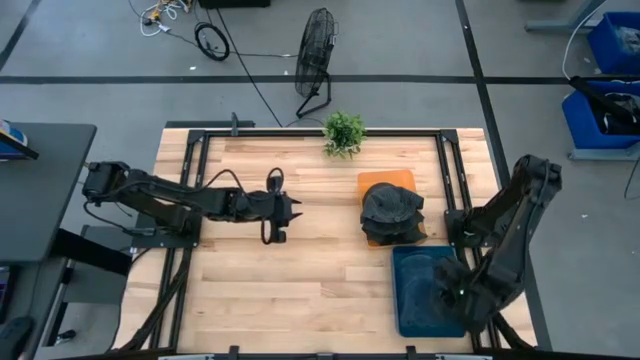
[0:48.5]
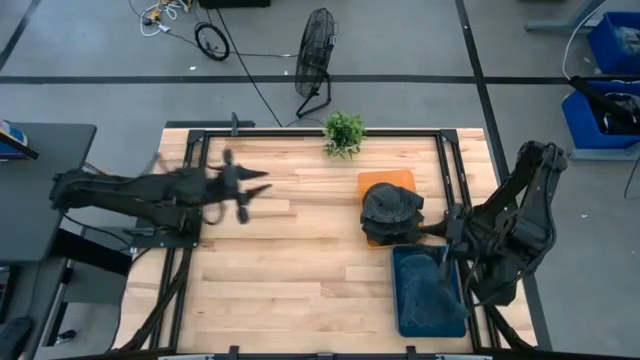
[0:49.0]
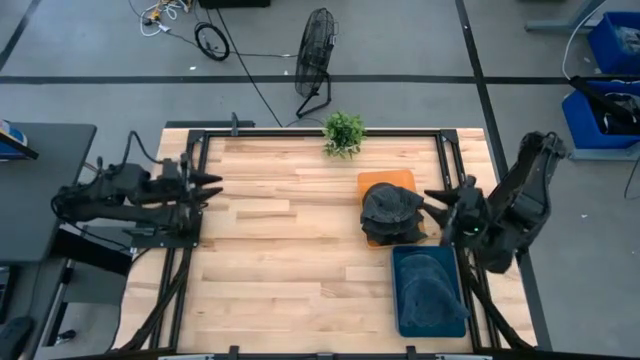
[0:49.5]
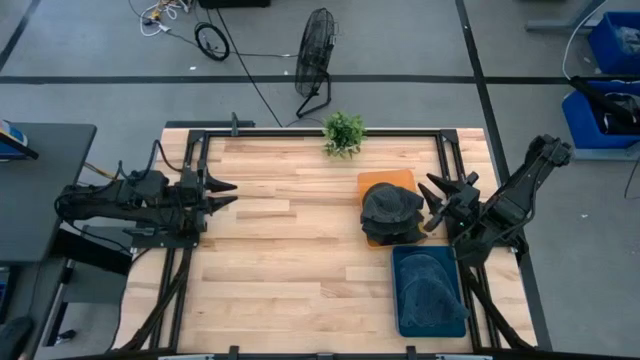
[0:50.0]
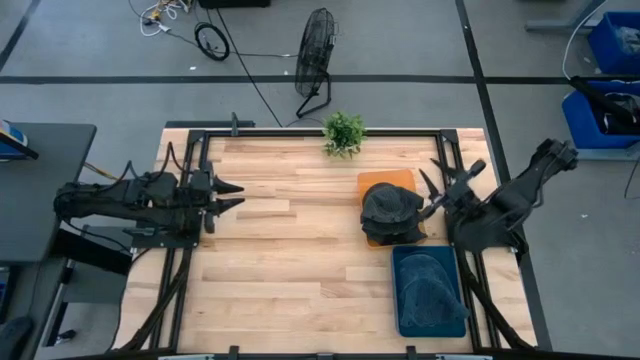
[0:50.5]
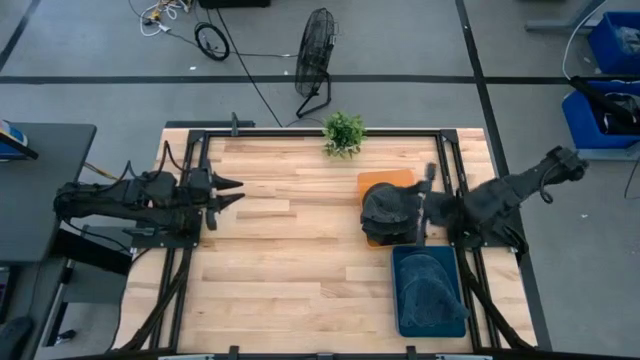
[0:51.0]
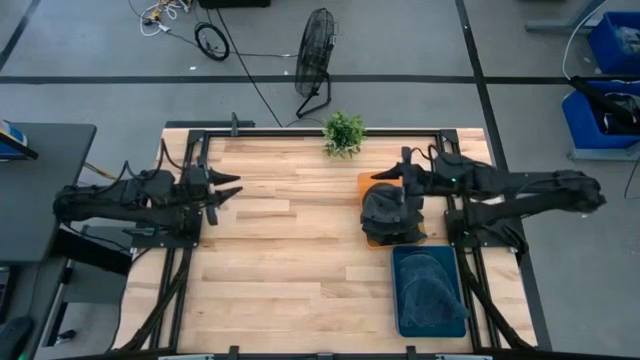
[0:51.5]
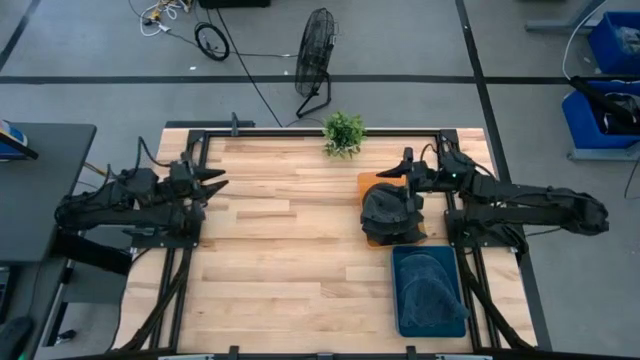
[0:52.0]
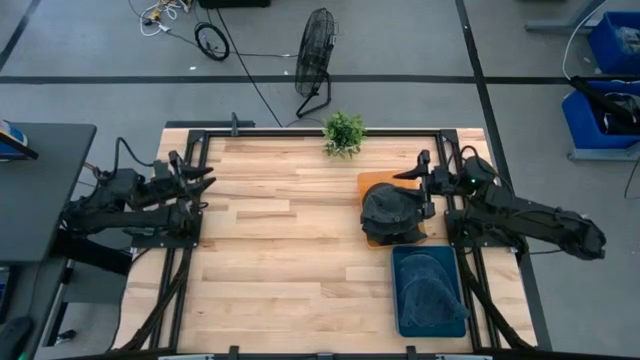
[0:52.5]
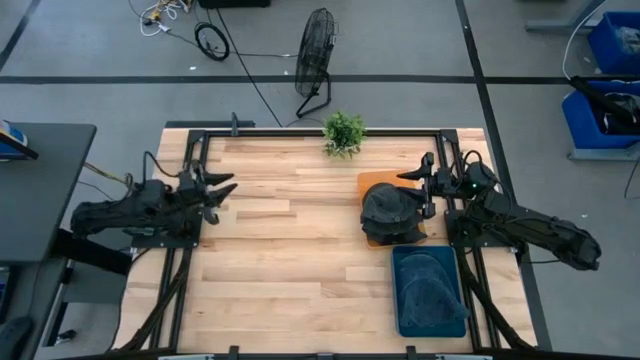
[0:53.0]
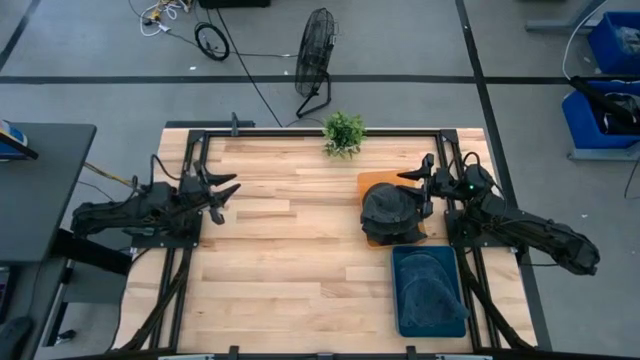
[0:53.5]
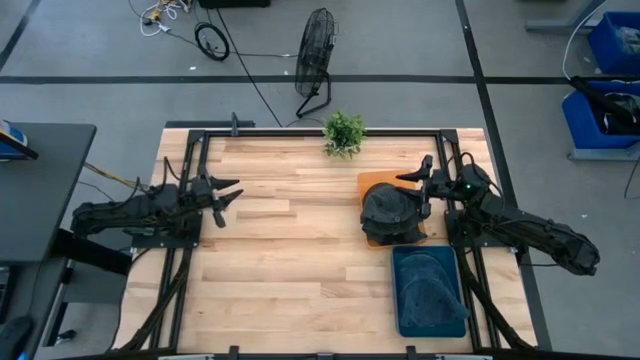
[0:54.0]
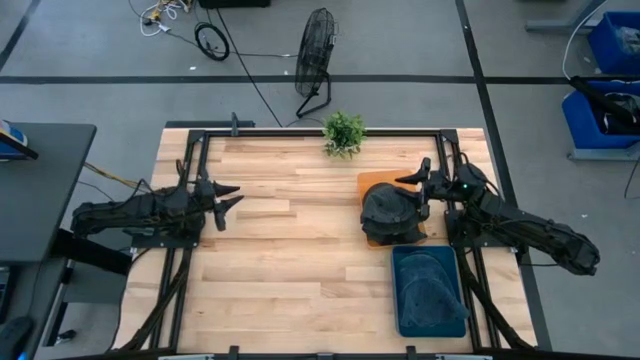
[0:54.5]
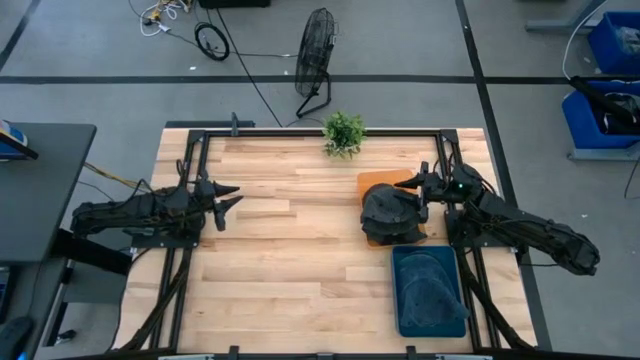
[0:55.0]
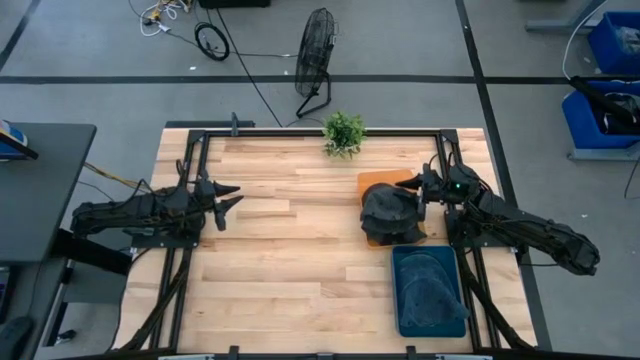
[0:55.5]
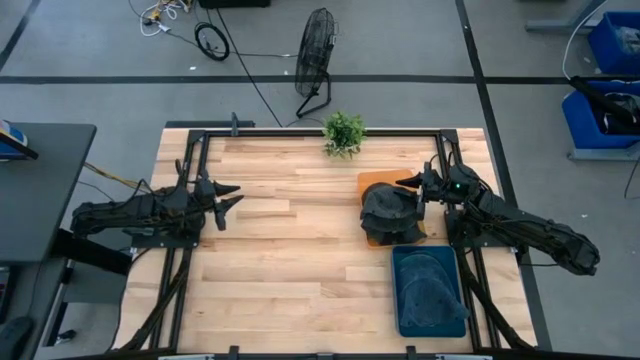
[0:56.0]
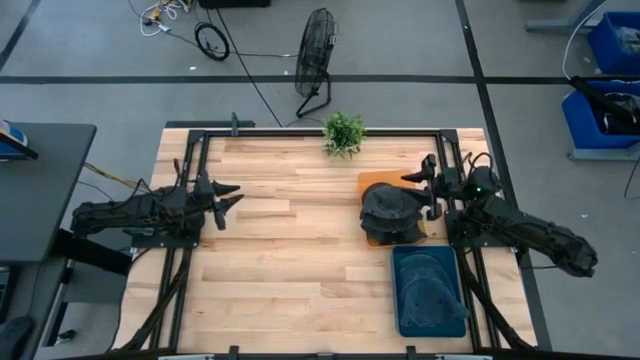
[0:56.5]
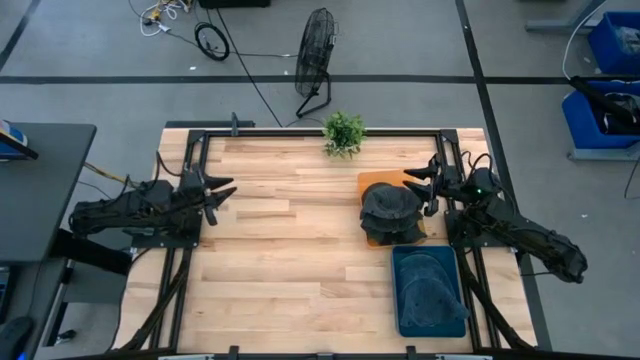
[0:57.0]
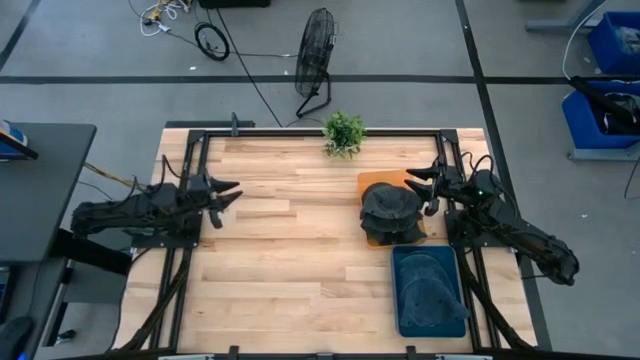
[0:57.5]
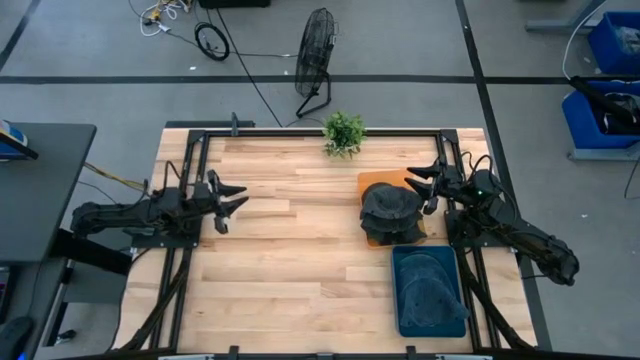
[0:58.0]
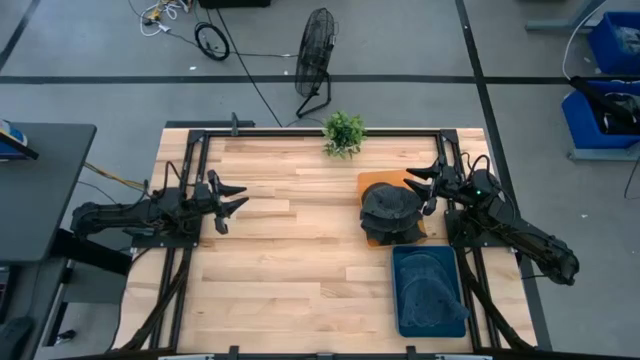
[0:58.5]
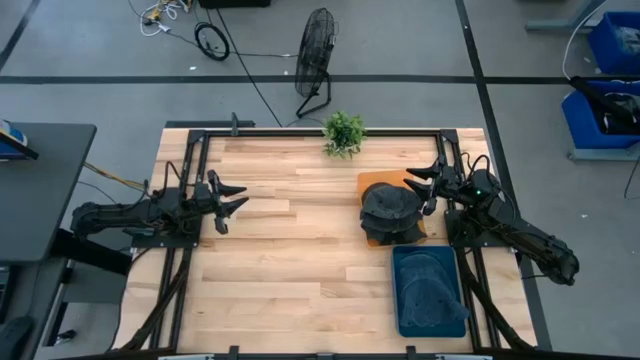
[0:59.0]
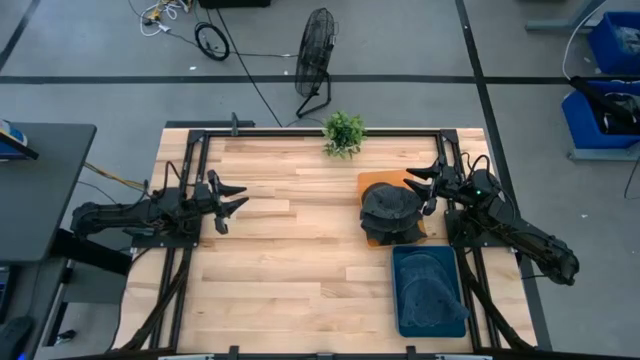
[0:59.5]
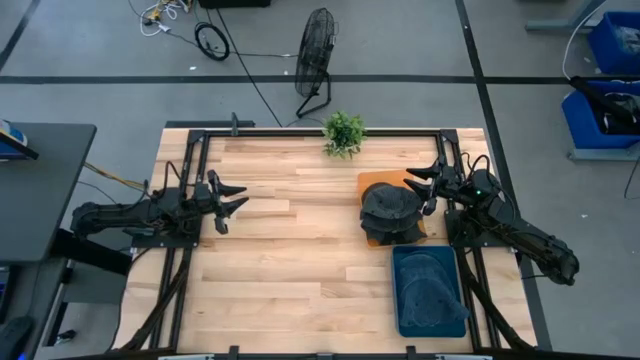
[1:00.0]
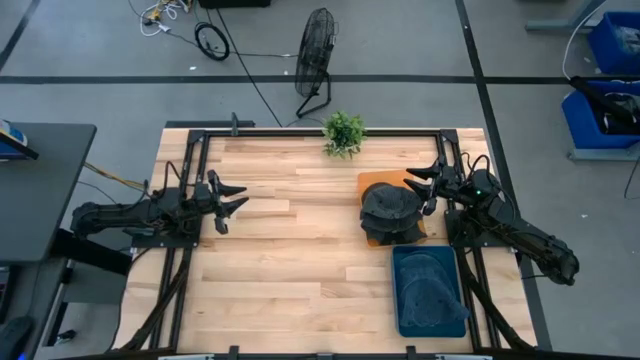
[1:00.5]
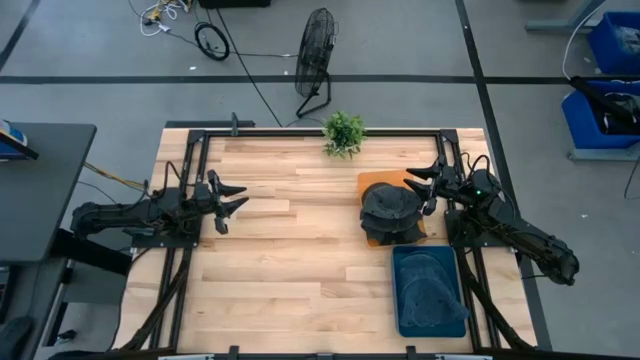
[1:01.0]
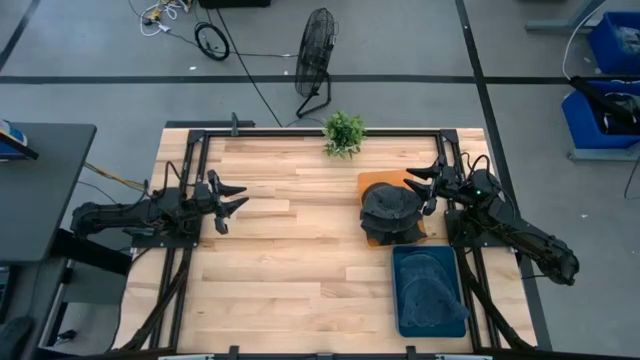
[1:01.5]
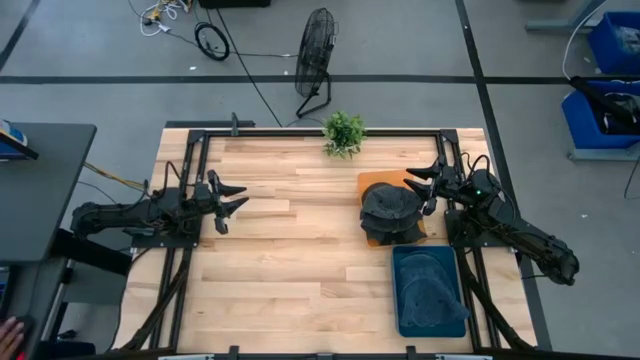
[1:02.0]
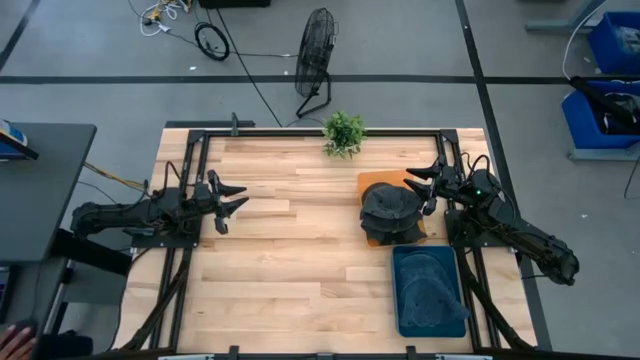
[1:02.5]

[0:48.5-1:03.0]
Task: Pick & Place hat
Return to Home Position

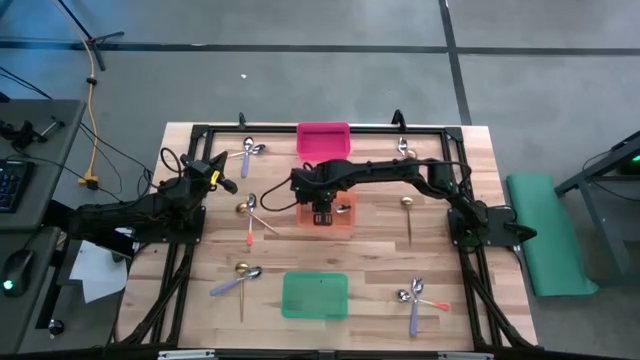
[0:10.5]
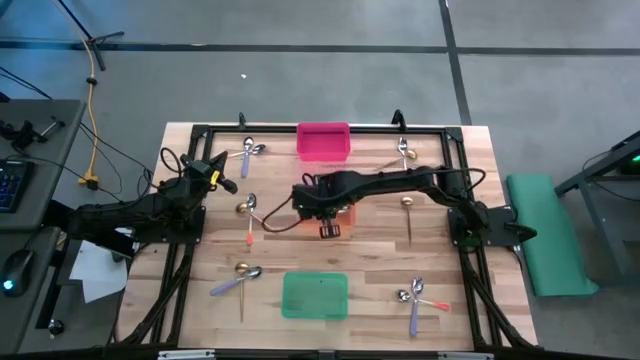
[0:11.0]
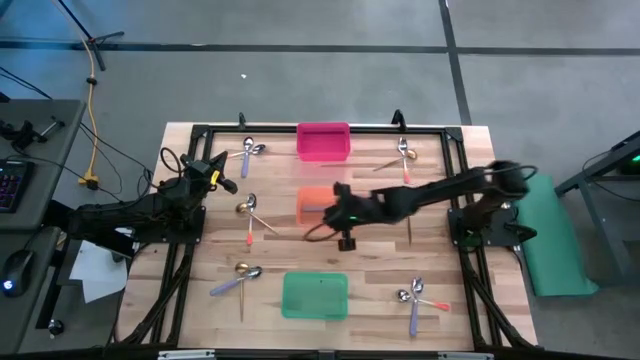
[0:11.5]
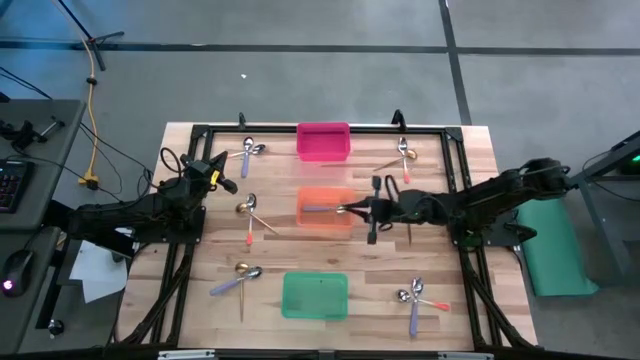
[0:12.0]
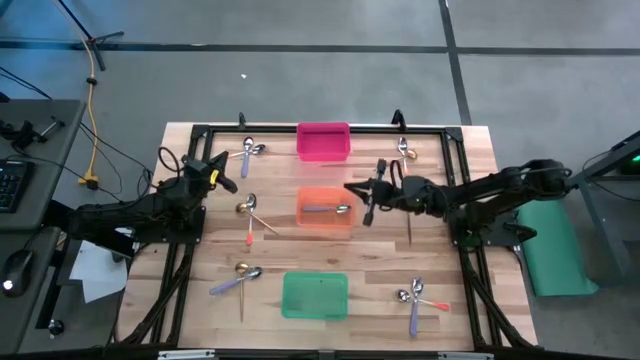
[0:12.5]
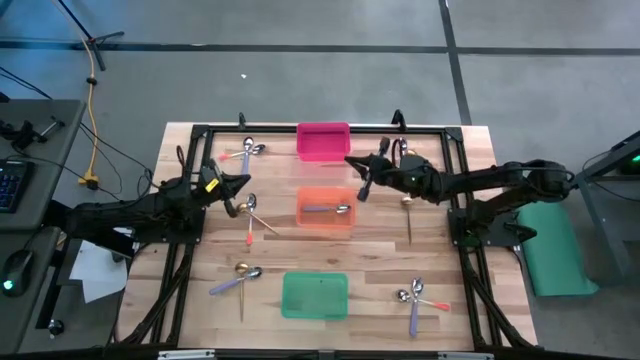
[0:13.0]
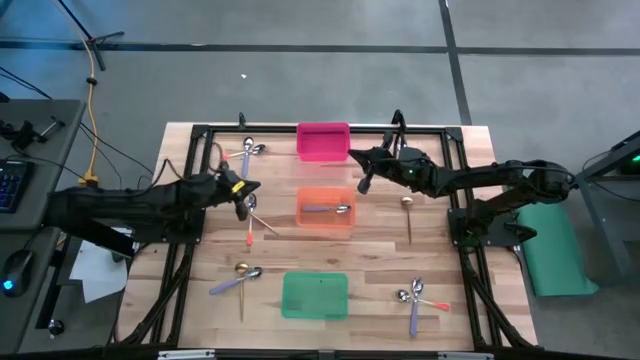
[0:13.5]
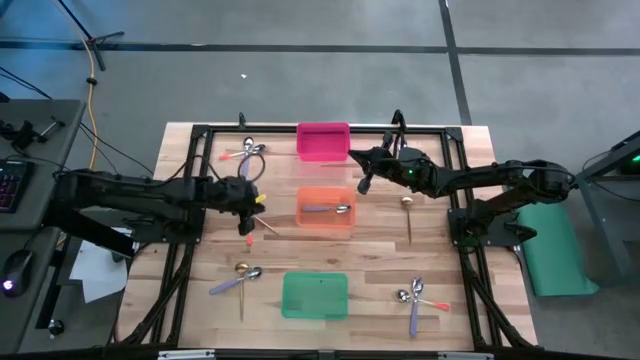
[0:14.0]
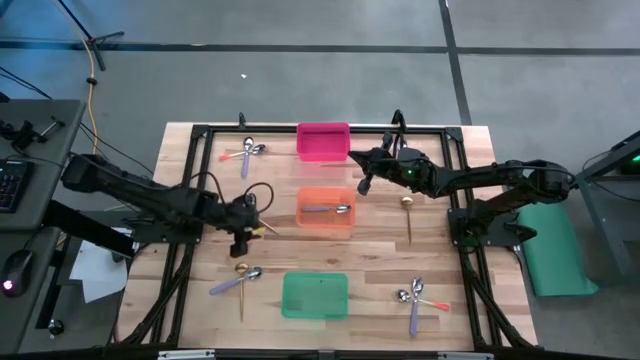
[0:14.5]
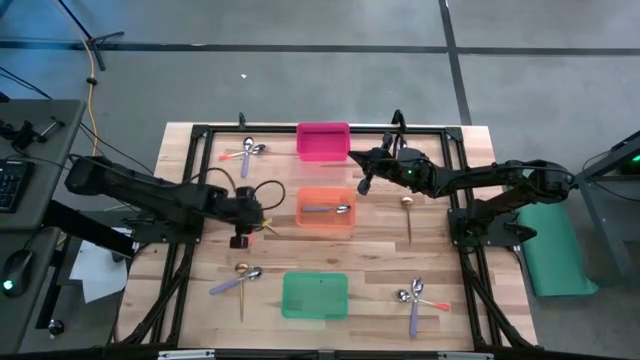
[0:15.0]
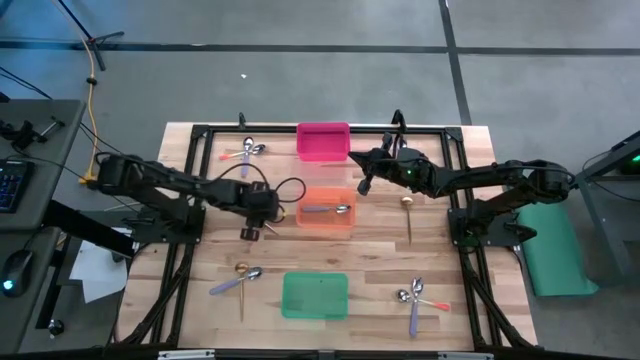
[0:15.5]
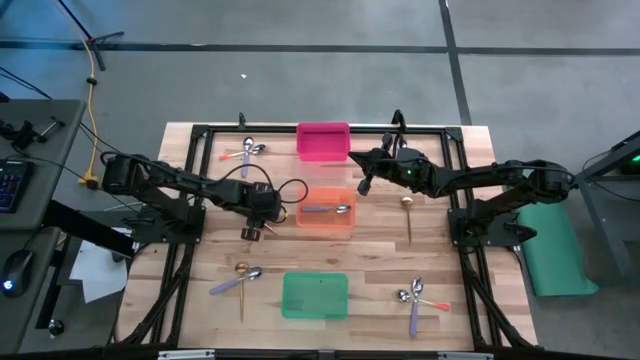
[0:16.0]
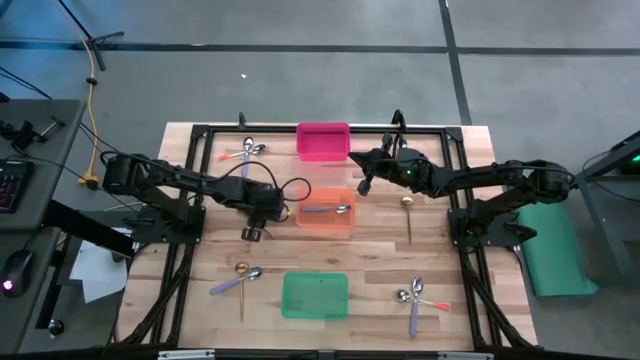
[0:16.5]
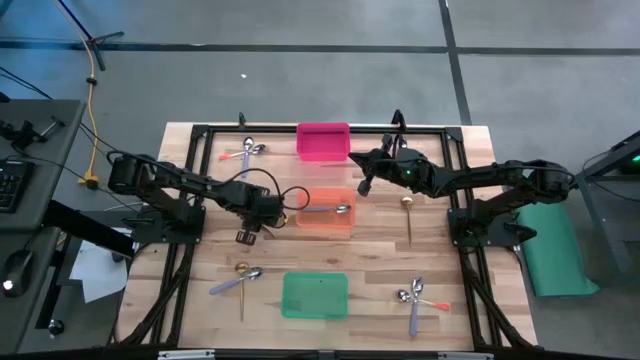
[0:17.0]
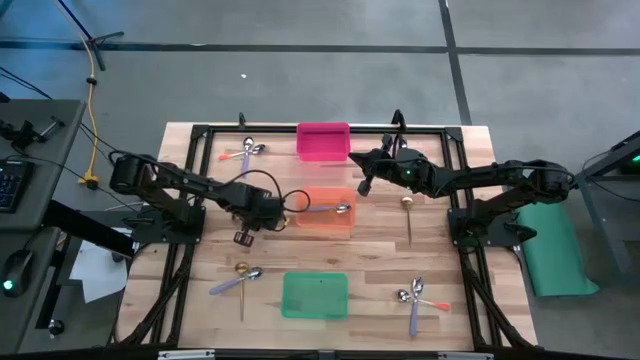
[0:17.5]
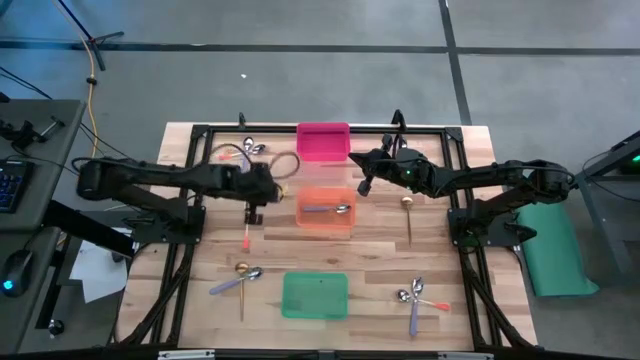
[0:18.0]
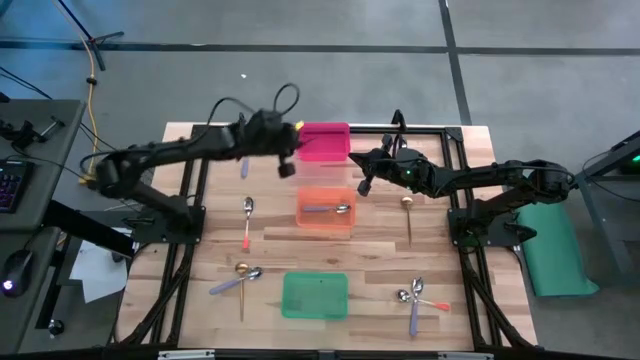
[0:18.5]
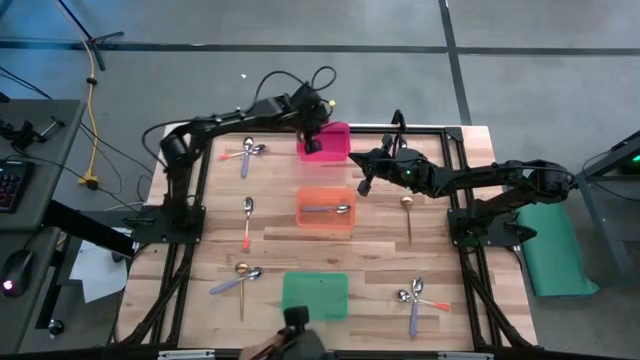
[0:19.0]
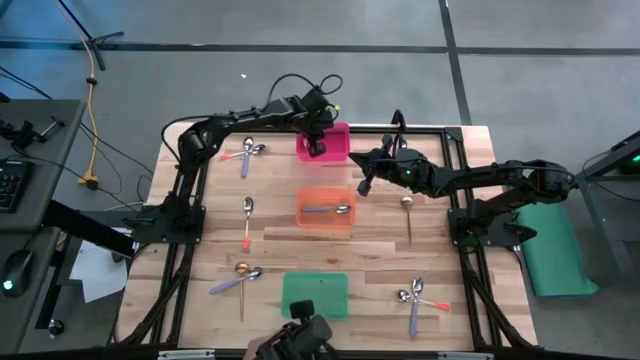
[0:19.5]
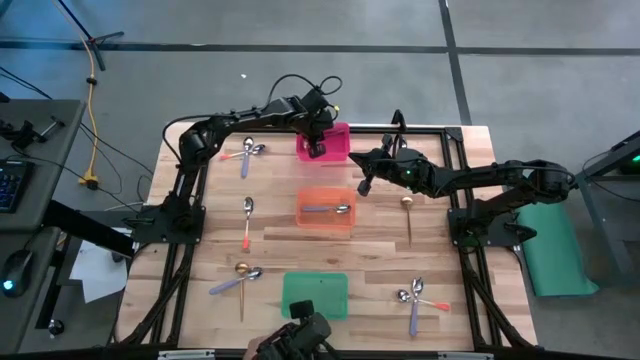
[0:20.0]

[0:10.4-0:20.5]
Task: Sort silverware by color (type)
Put the middle left gold spoon into the red bin
